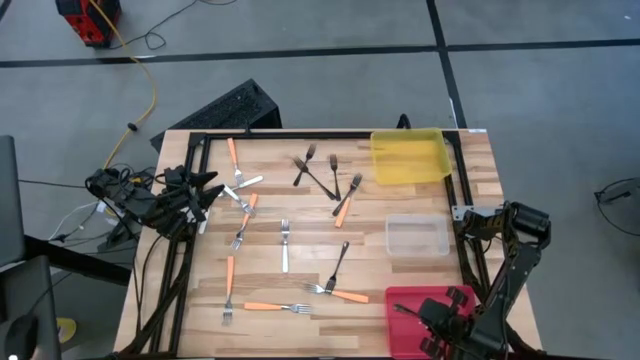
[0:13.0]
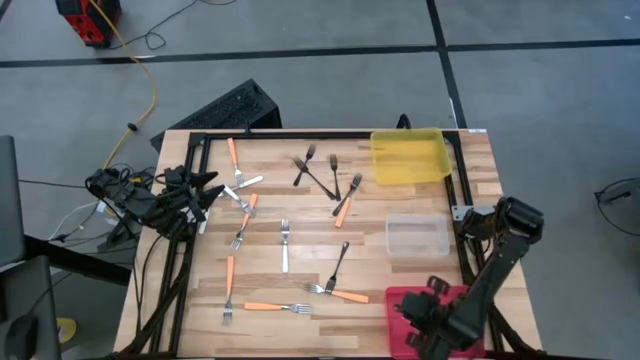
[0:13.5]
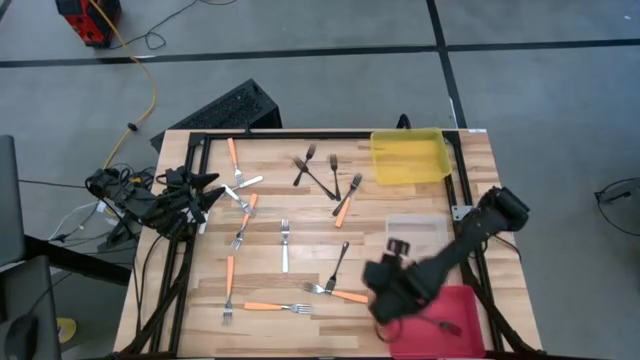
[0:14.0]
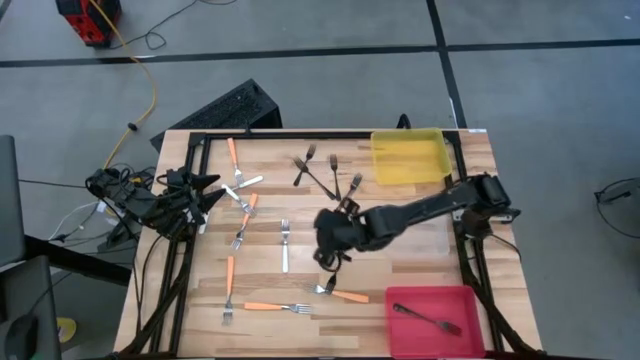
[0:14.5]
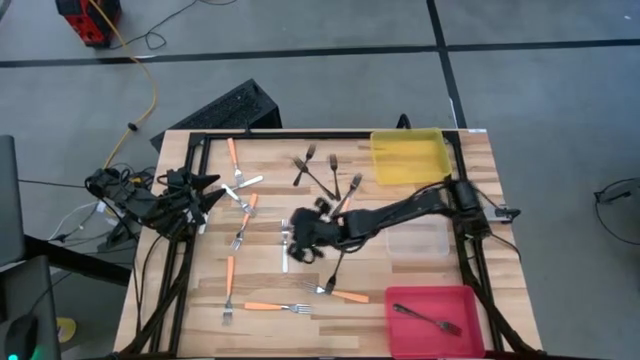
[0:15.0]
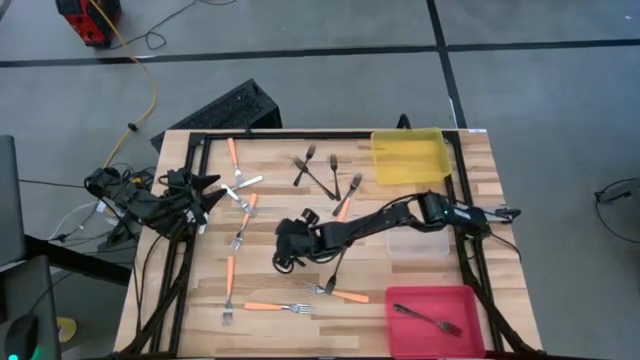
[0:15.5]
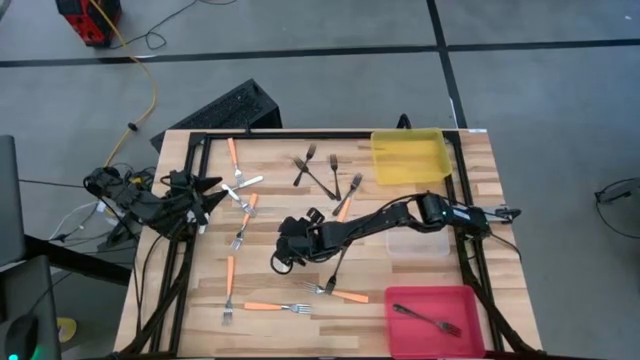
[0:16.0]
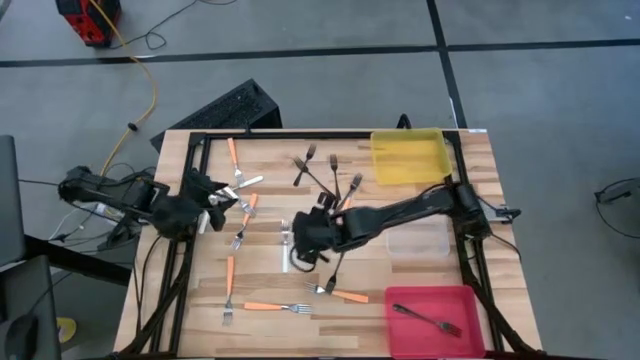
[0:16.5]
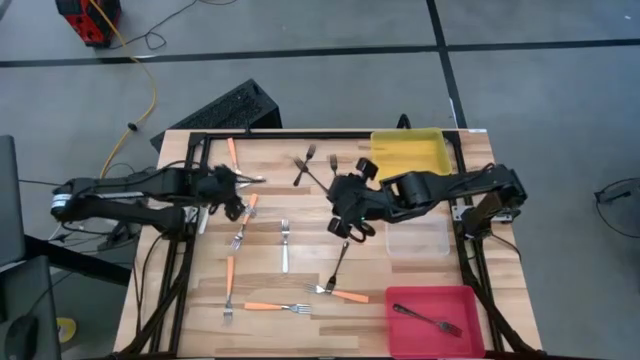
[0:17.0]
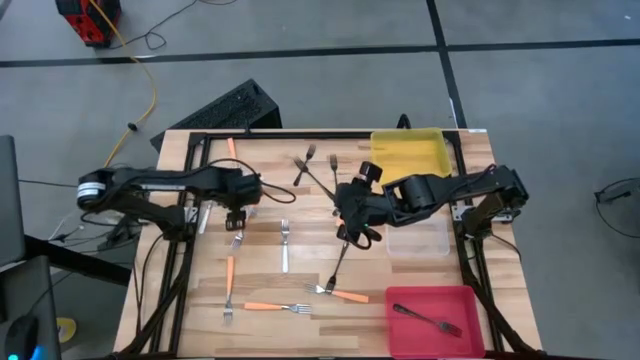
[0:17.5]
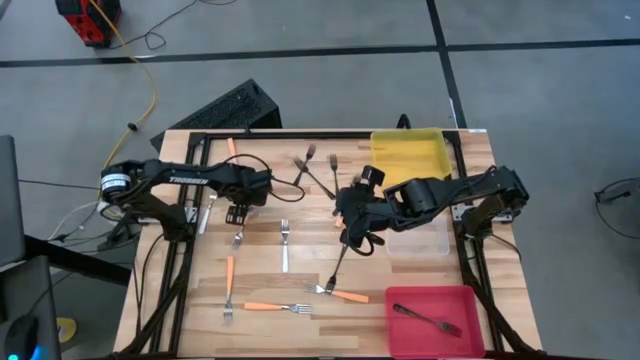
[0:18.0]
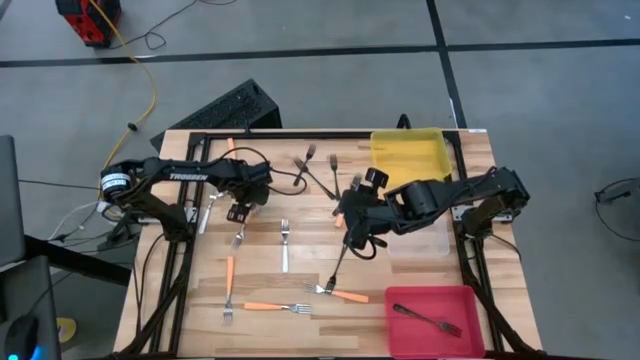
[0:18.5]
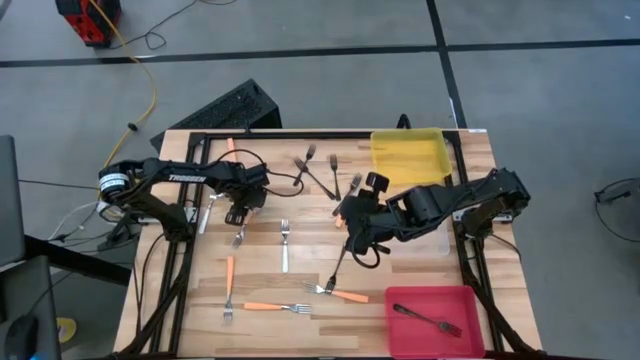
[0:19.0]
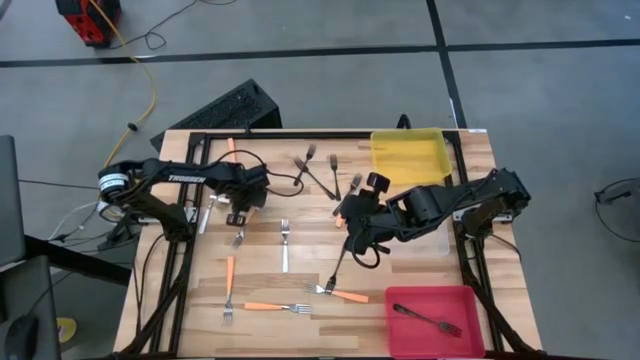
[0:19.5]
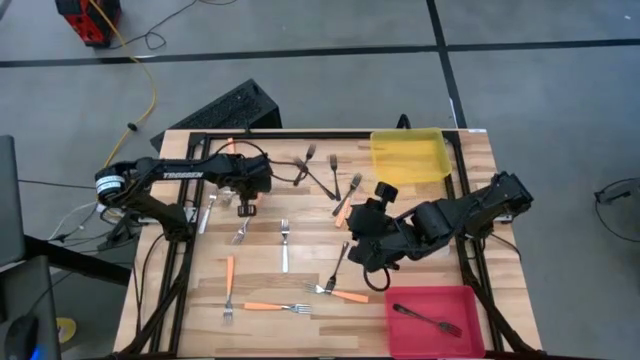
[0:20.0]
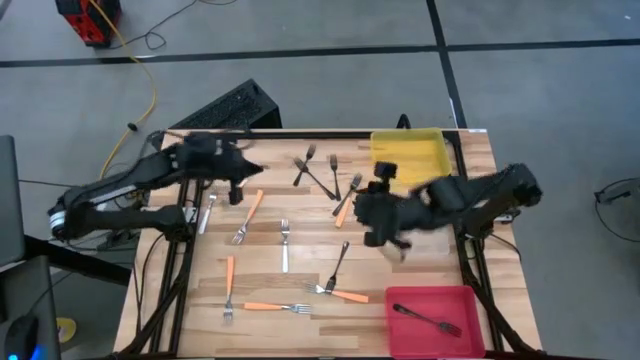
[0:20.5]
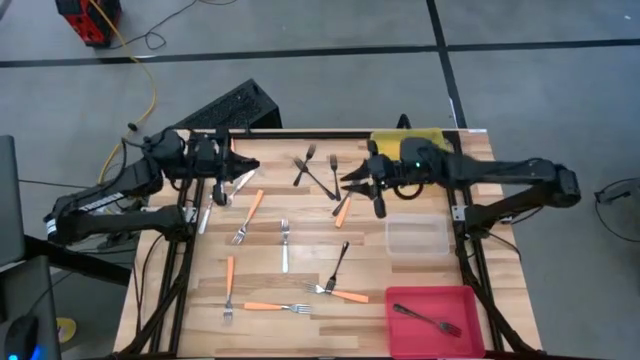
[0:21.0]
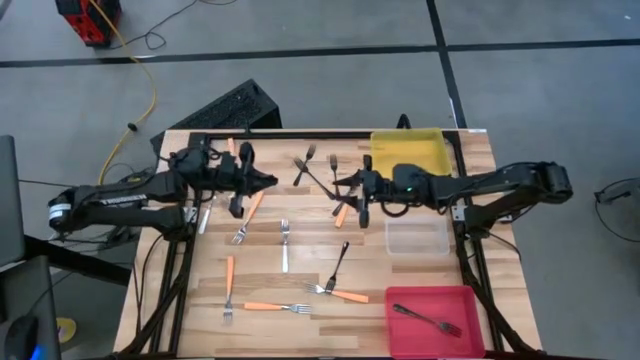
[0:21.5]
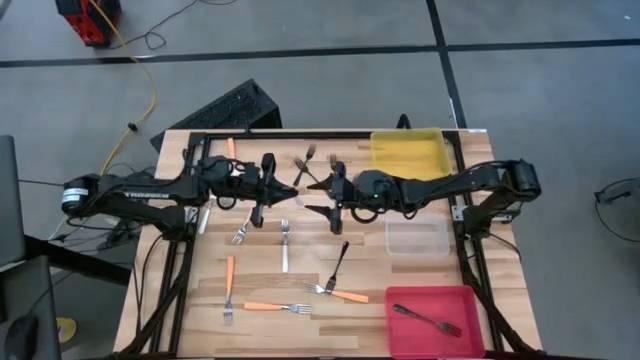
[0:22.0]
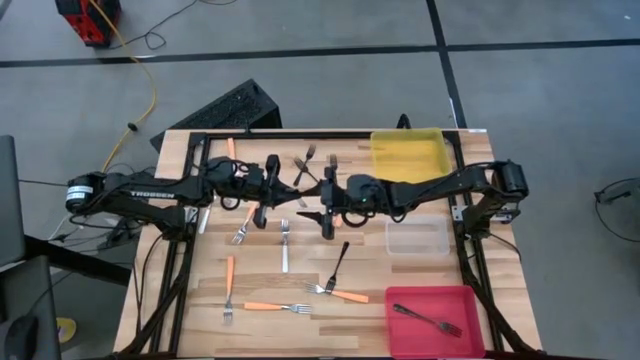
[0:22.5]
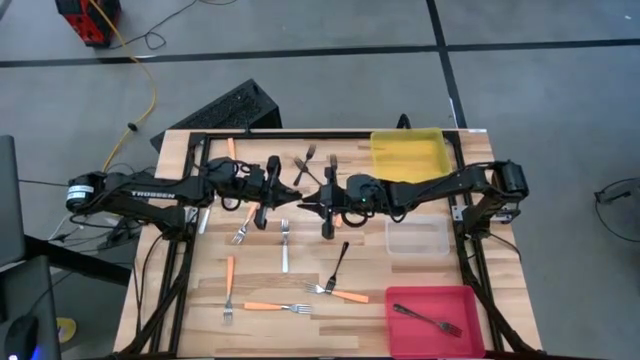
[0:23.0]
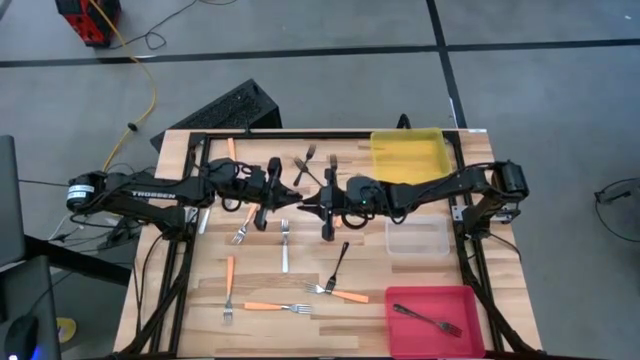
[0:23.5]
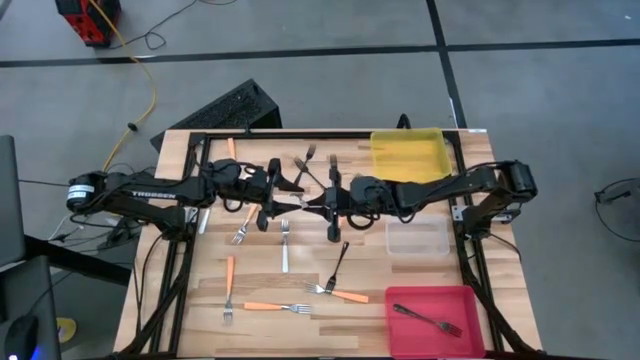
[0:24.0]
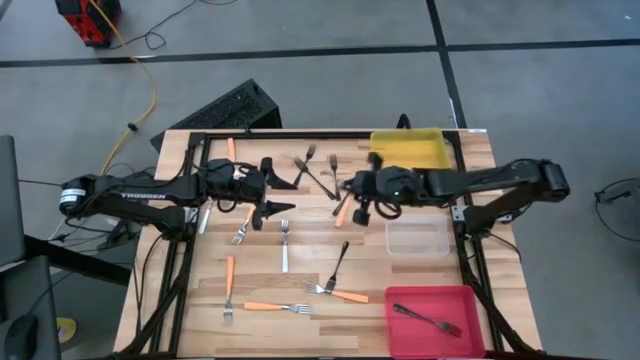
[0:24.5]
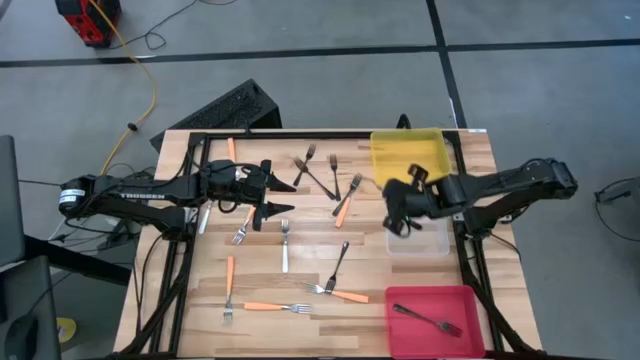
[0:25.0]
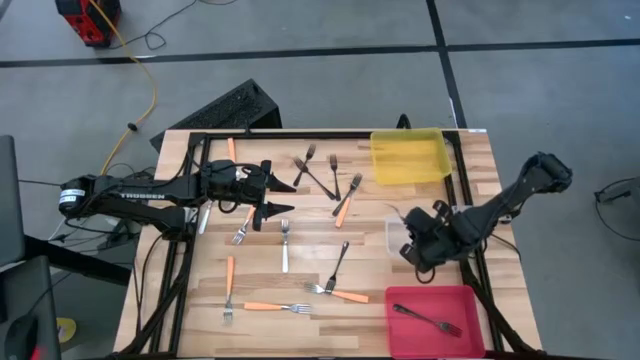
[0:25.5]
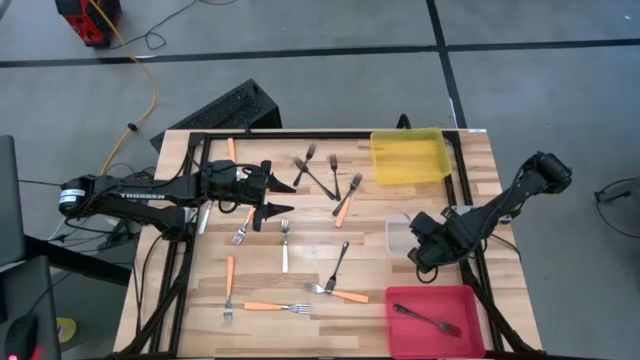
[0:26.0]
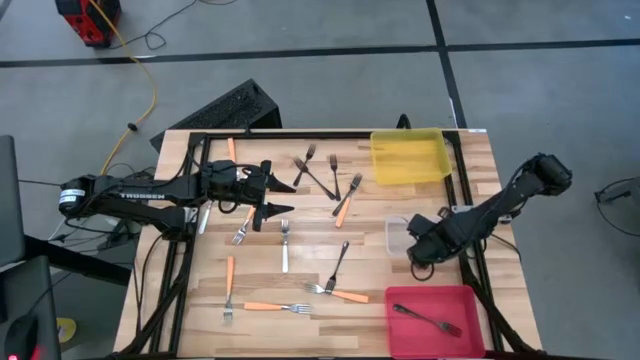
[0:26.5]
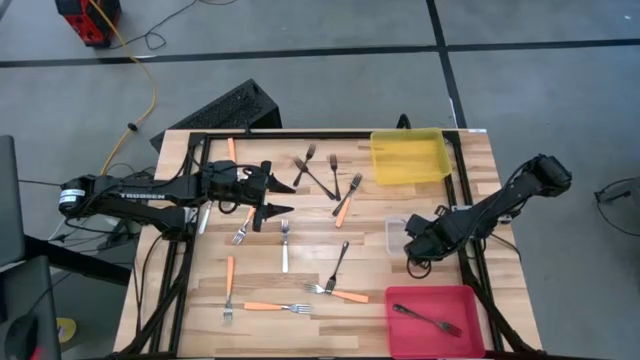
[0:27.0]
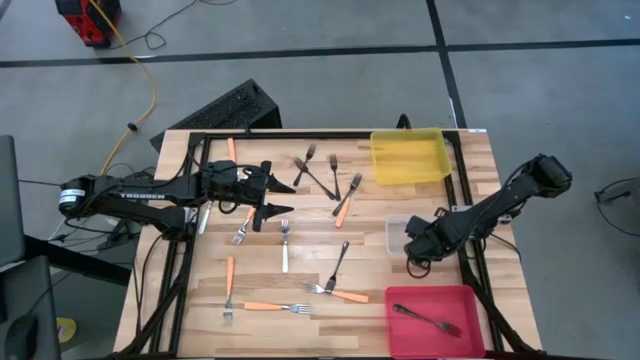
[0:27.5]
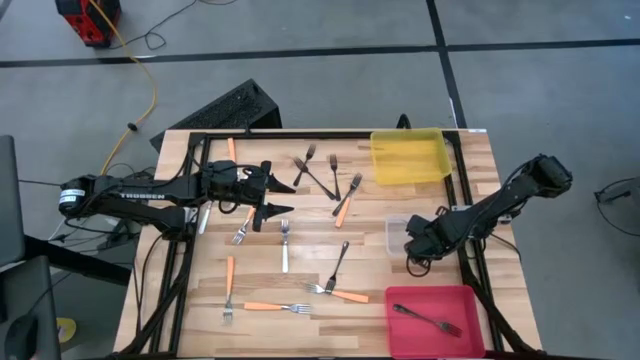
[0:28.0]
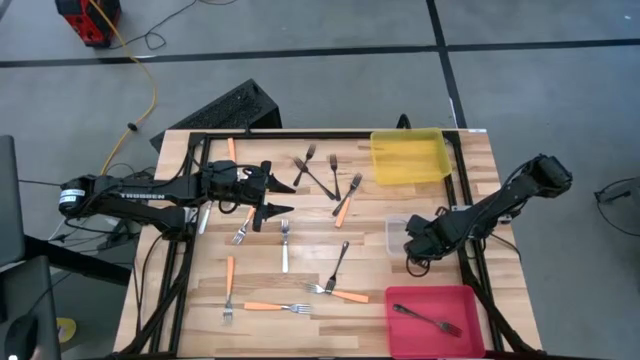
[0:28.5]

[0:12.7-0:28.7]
Task: Sort silverware by color (type)
Put the white fork into the transparent bin
